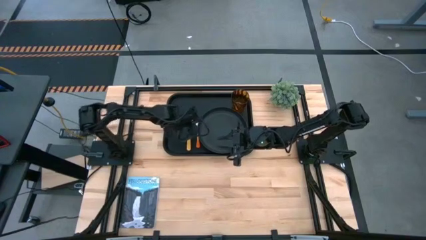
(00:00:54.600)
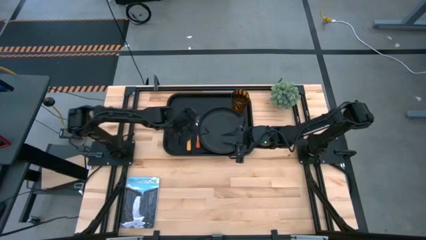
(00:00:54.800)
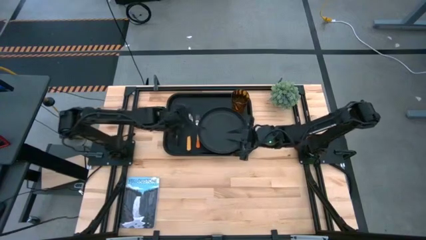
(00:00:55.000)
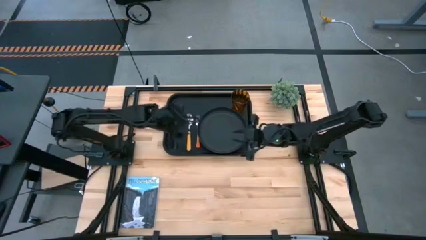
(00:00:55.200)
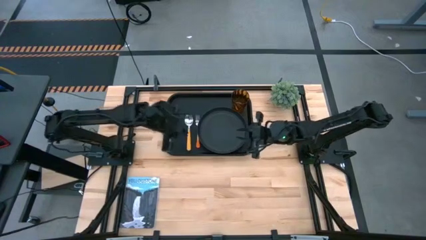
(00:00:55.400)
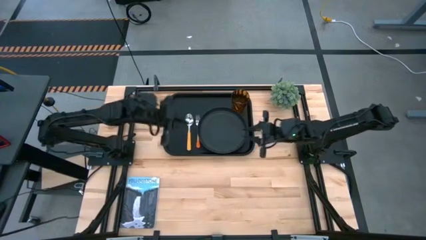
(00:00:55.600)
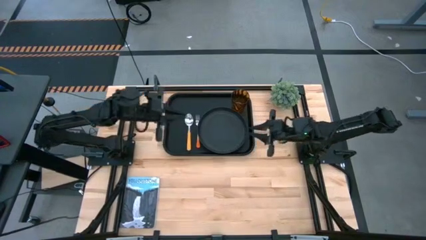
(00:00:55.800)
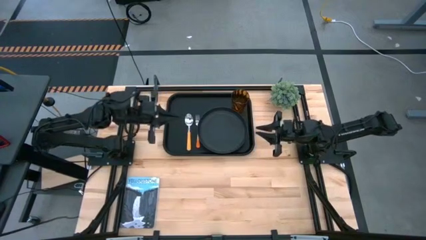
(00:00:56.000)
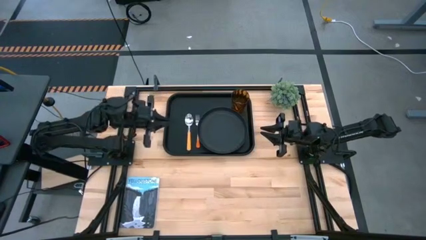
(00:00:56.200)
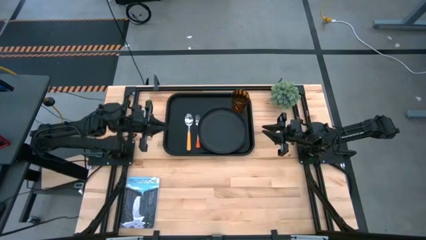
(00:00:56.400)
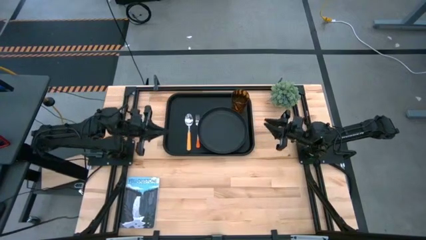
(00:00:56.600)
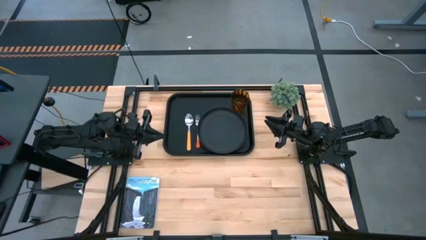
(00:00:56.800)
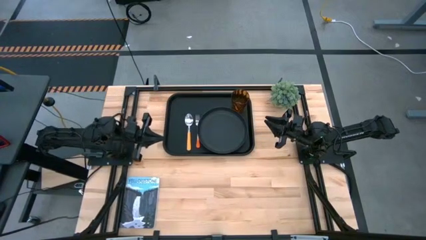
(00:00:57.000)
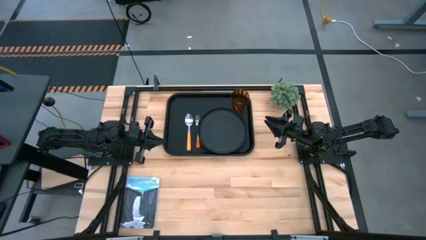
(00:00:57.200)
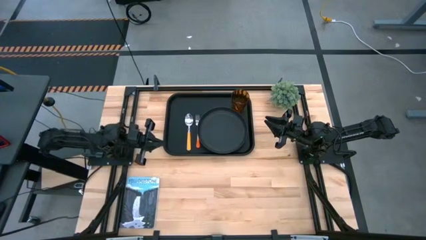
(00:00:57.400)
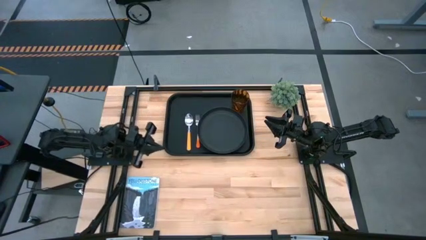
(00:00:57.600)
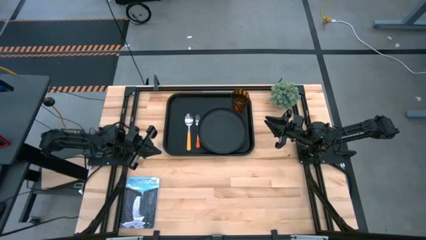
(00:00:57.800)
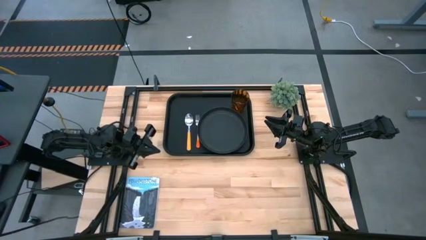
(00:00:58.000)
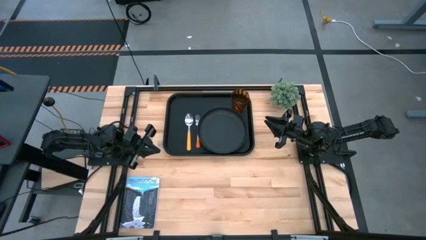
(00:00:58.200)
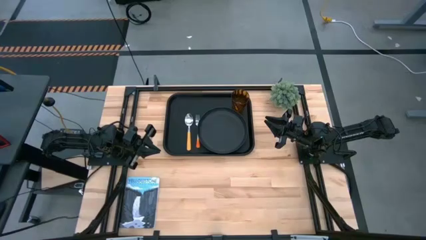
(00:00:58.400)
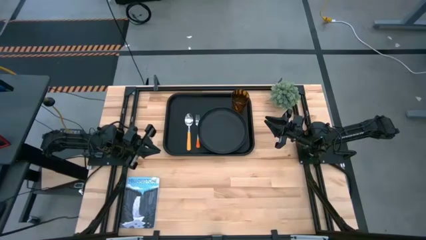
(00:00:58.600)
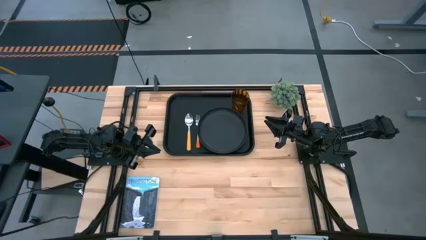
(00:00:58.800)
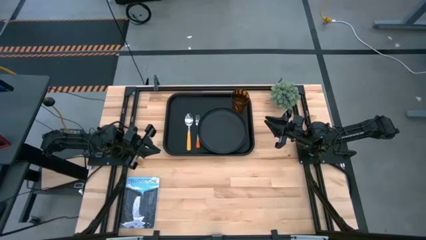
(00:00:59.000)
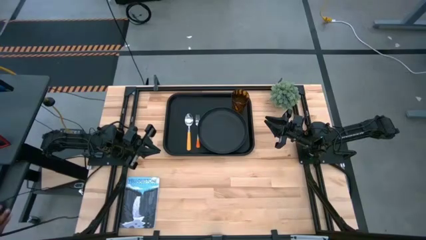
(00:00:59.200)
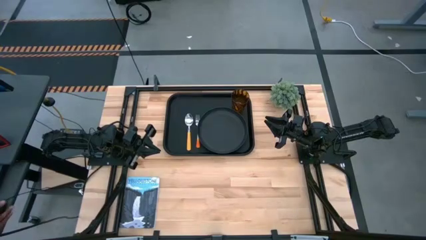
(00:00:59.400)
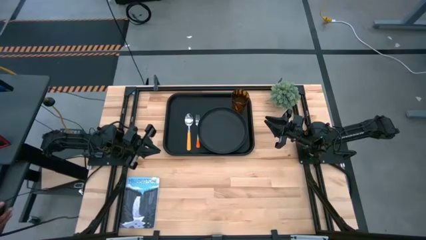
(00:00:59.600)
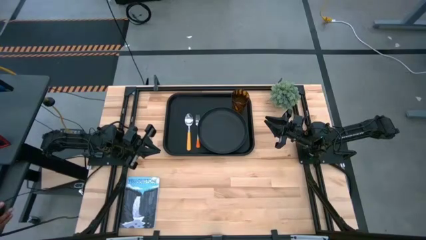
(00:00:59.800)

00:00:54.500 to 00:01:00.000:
Task: Pick and place plate/cup/fork/spoon on tray
Return to Home Position
